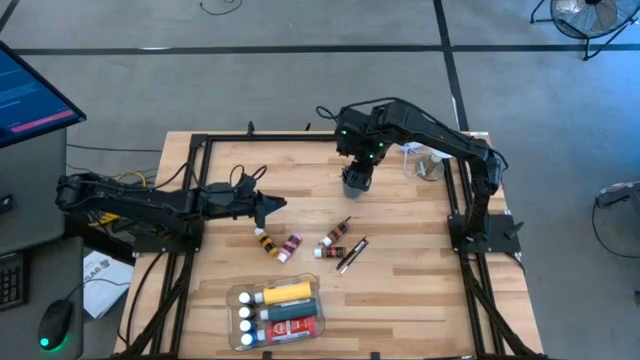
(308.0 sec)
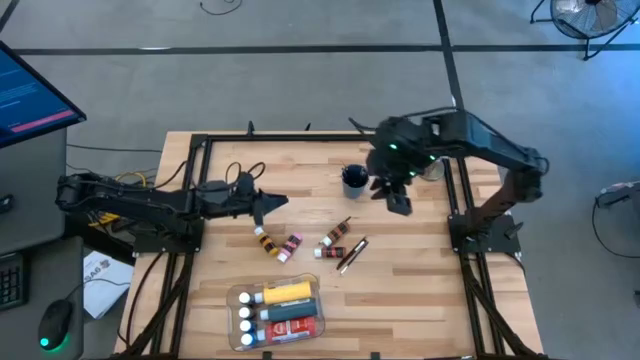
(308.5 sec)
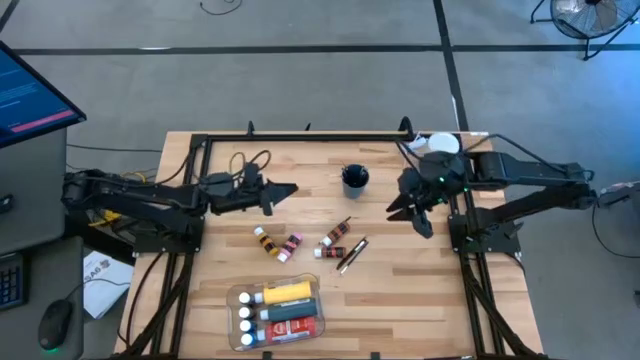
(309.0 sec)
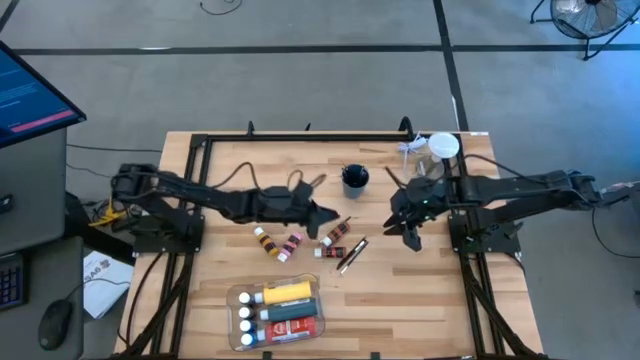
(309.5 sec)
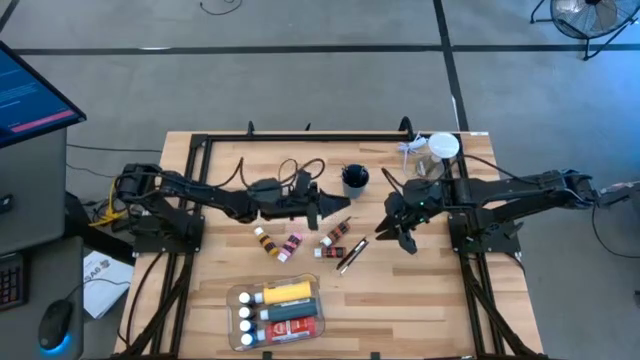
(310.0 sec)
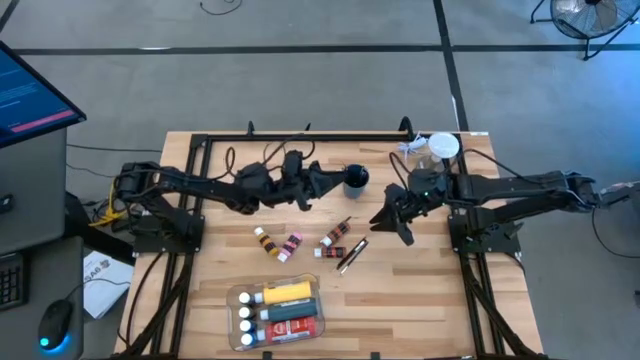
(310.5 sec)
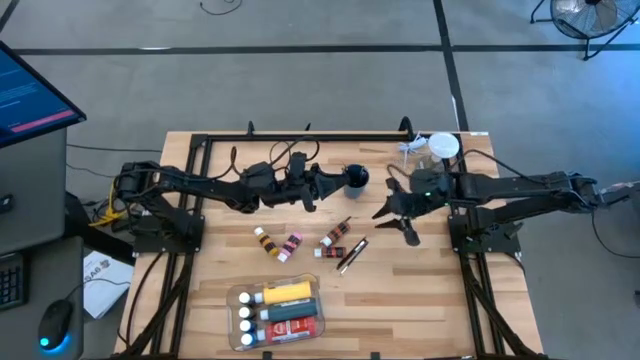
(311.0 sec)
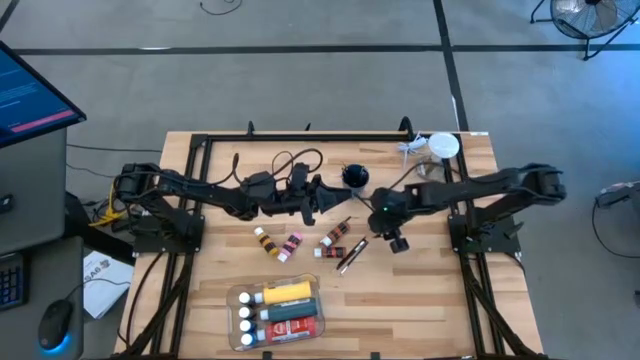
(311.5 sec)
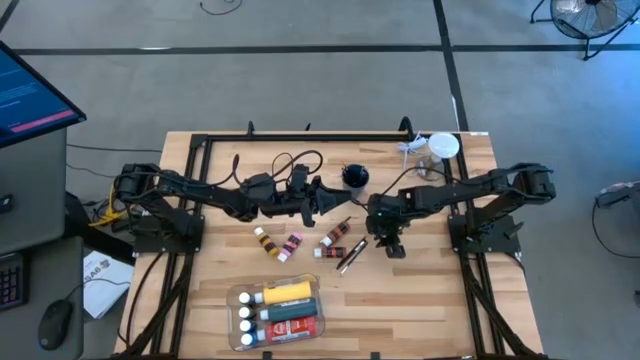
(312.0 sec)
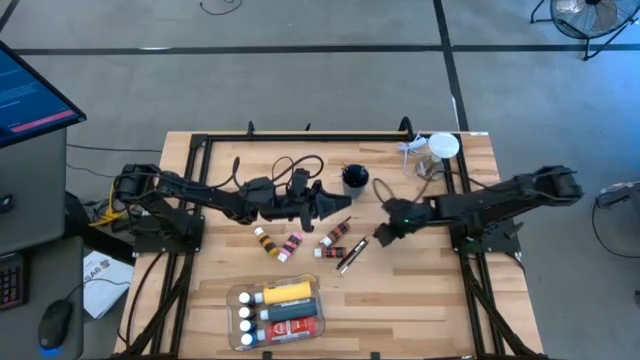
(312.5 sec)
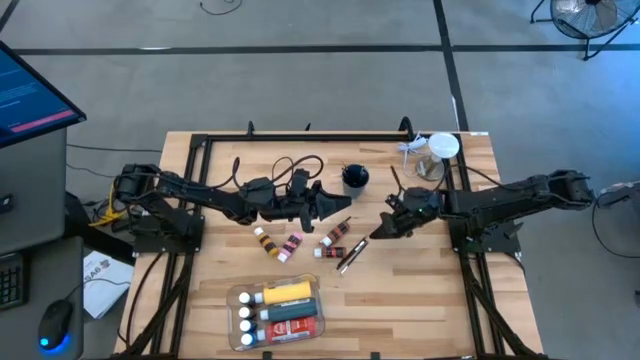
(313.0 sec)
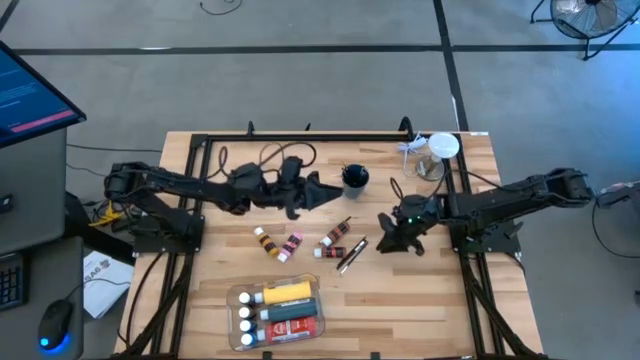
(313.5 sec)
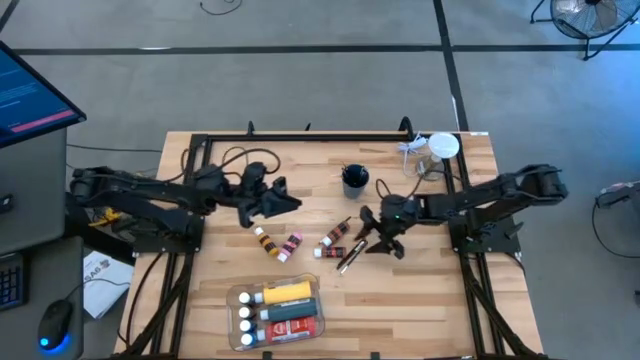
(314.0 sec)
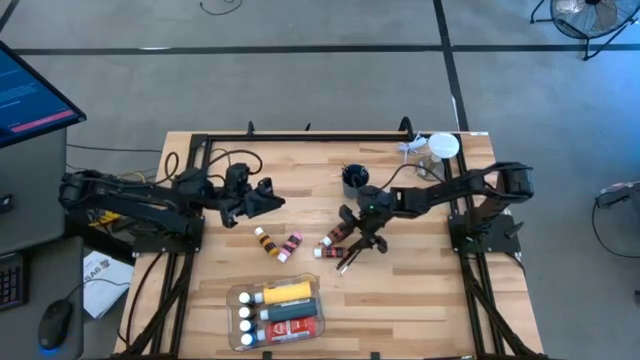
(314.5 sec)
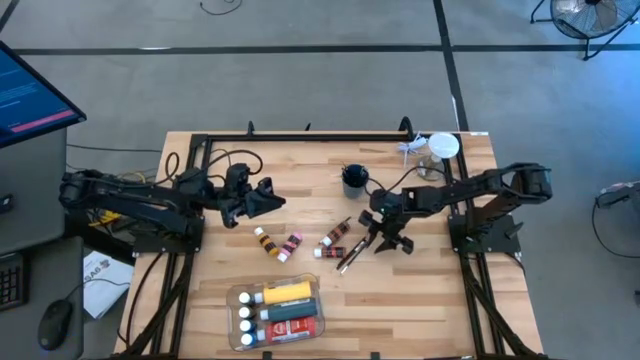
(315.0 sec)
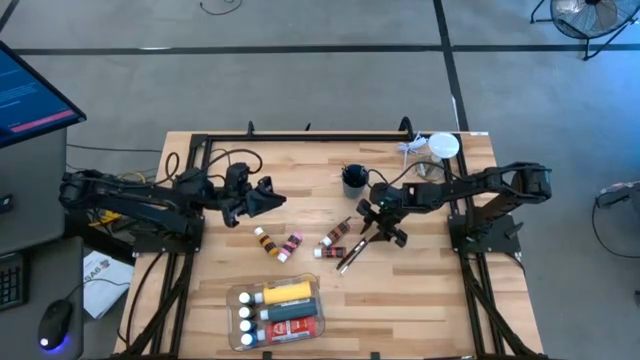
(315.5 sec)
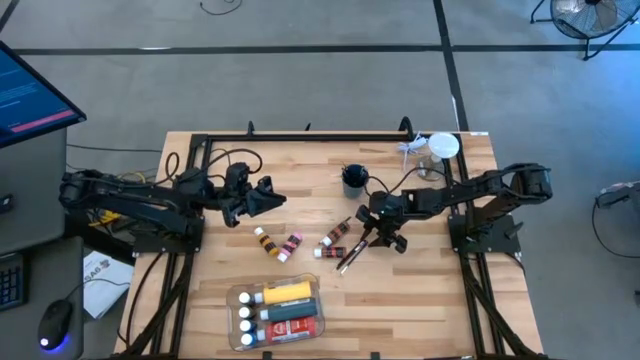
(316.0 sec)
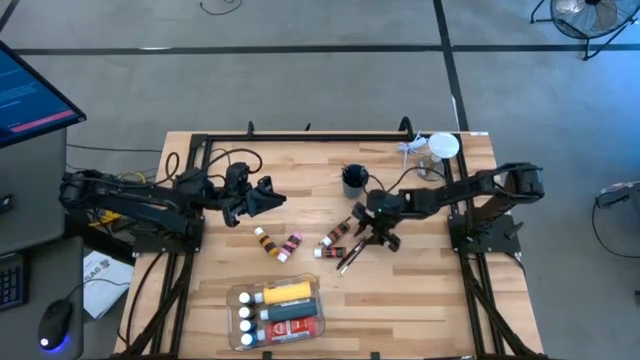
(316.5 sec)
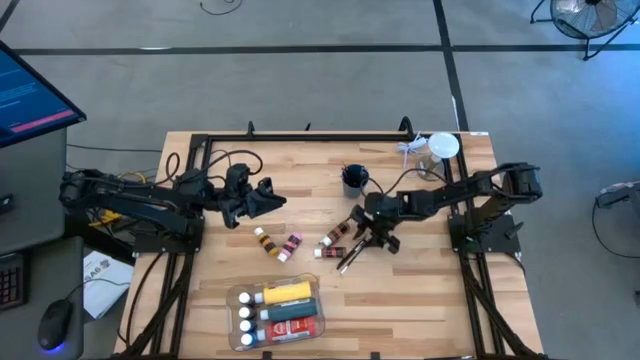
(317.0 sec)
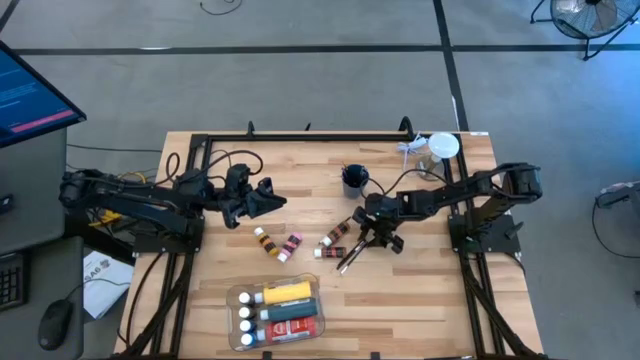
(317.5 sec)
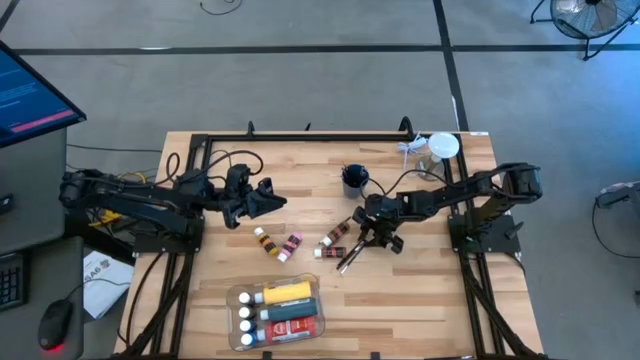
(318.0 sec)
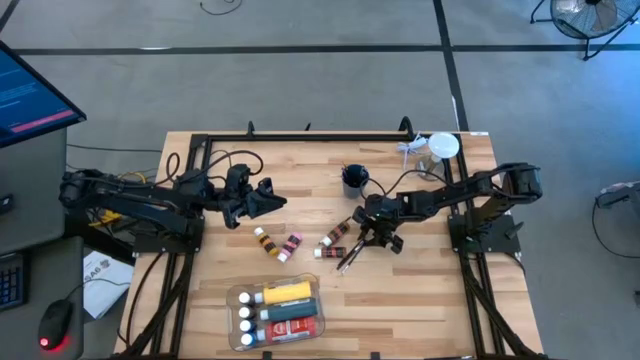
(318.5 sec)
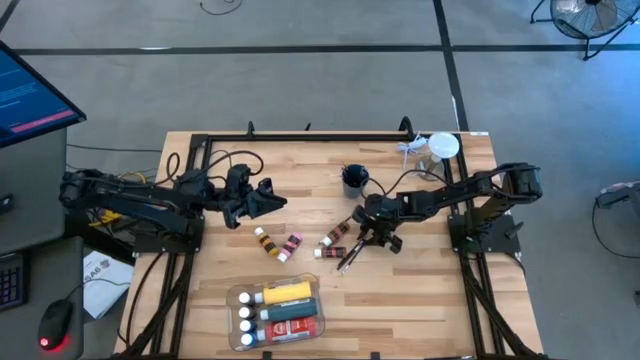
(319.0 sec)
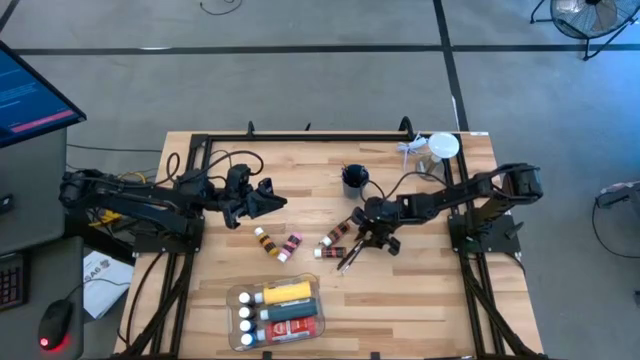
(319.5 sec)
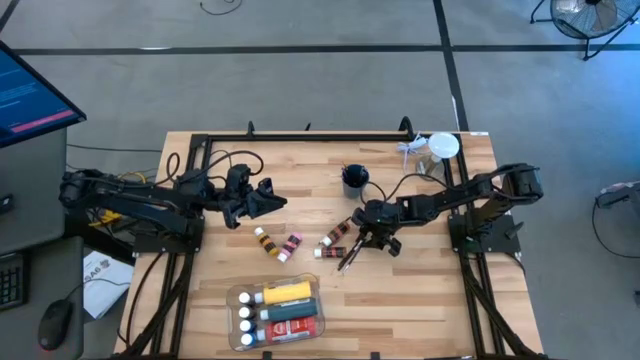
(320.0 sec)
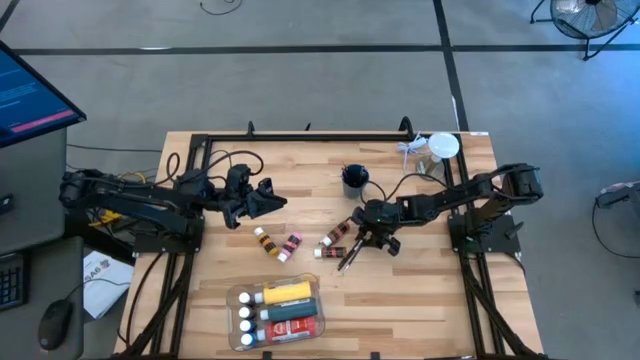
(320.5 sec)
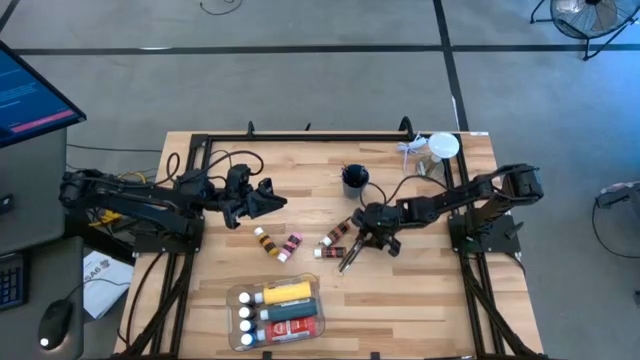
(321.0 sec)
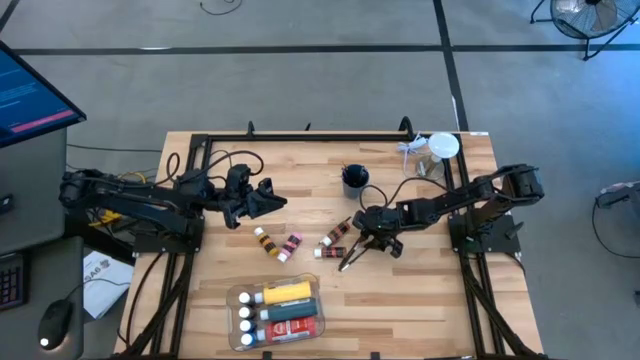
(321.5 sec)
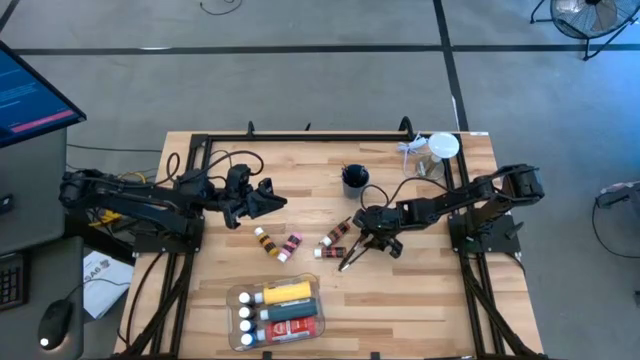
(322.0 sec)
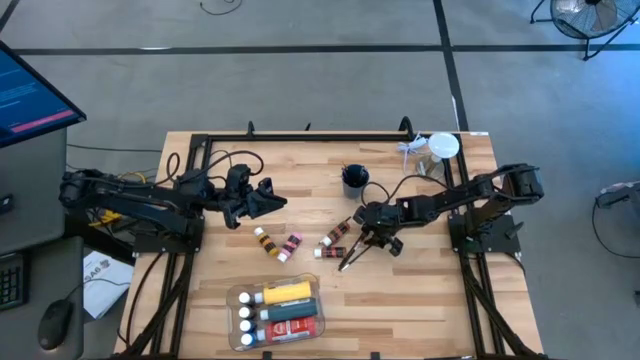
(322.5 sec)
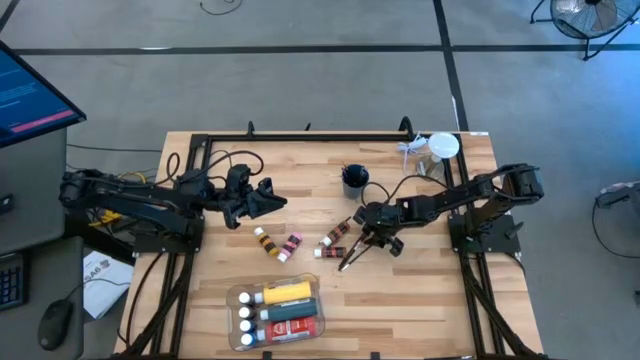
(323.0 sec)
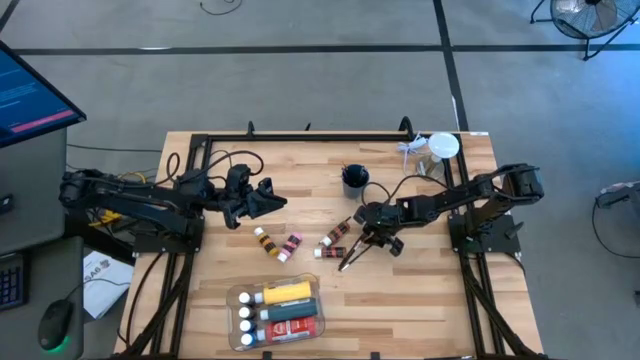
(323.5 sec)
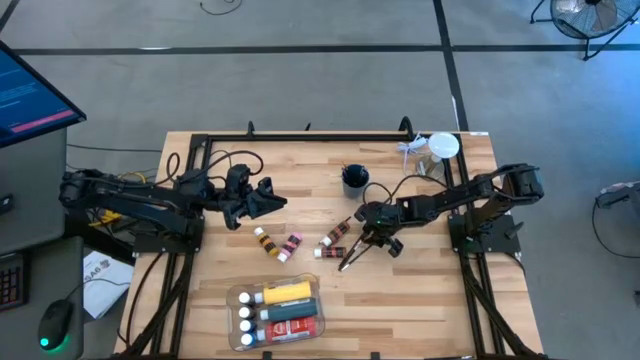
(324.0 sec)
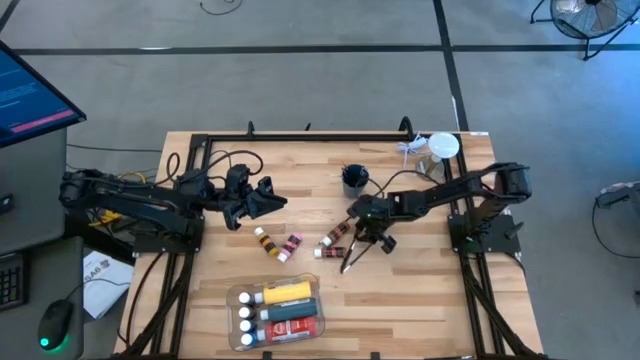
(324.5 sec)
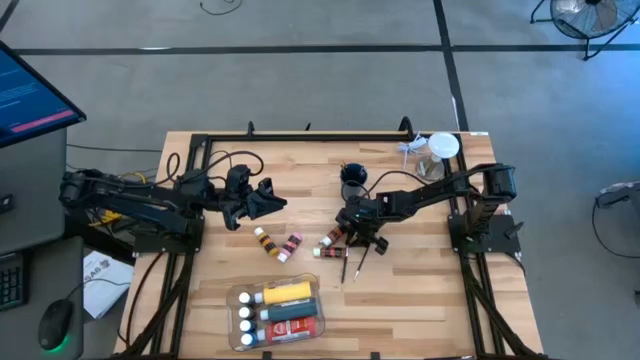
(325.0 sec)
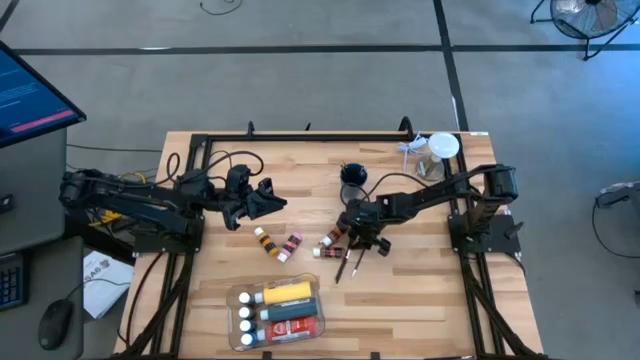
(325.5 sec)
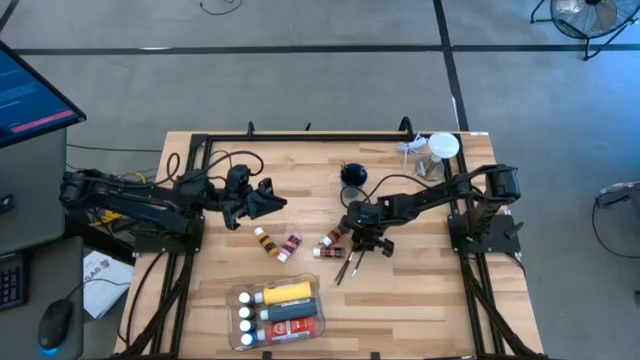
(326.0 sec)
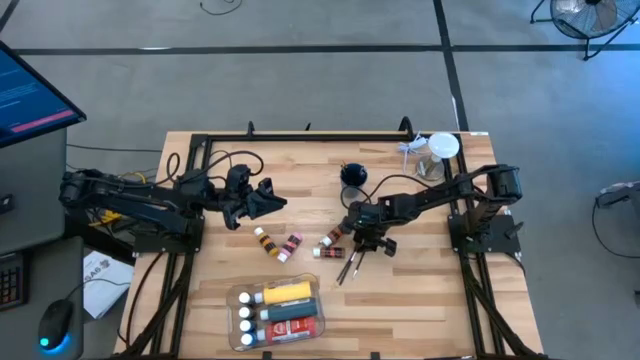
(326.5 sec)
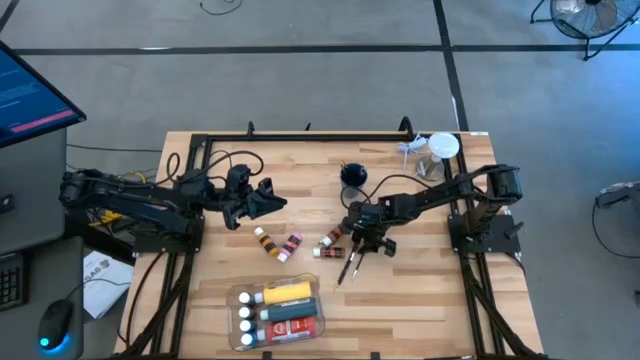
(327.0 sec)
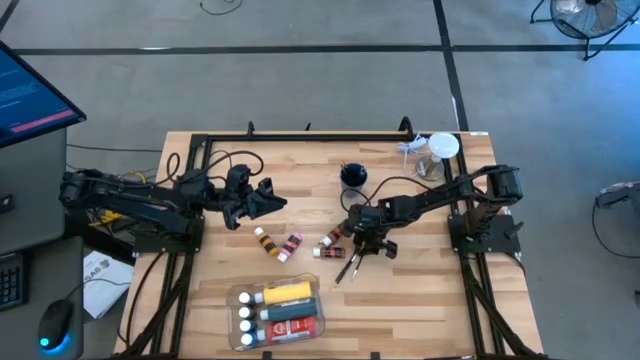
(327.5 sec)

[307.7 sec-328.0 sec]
Task: Pick & Place Paint Supplies
Put the paint brush into the blue cup

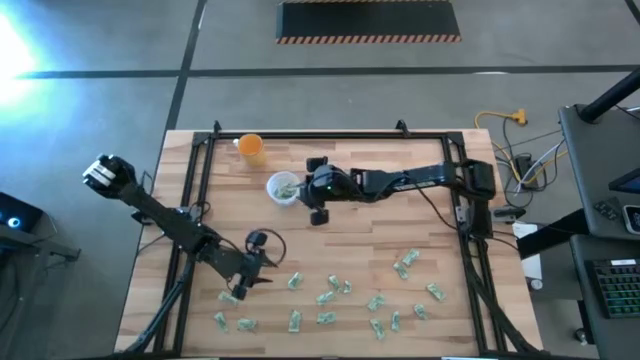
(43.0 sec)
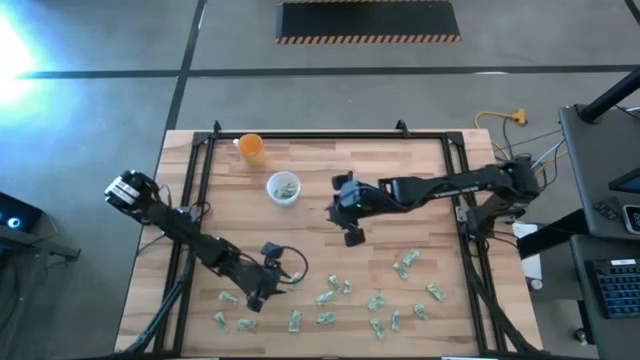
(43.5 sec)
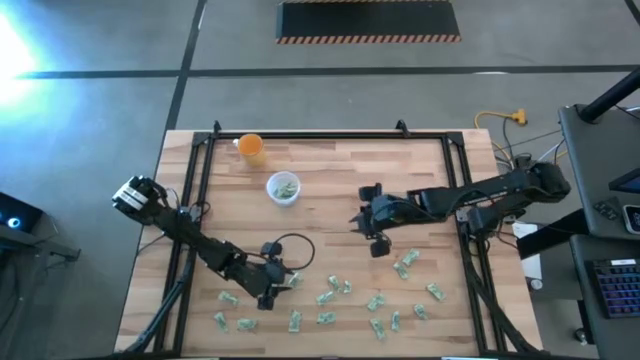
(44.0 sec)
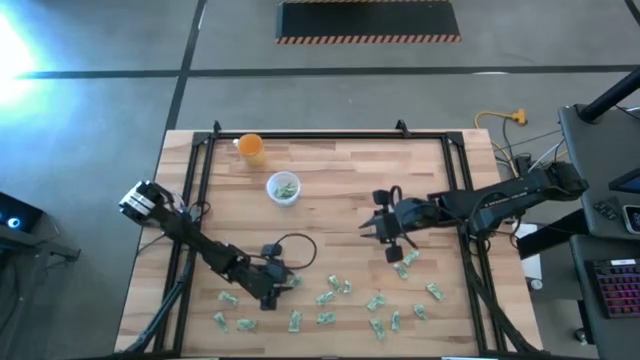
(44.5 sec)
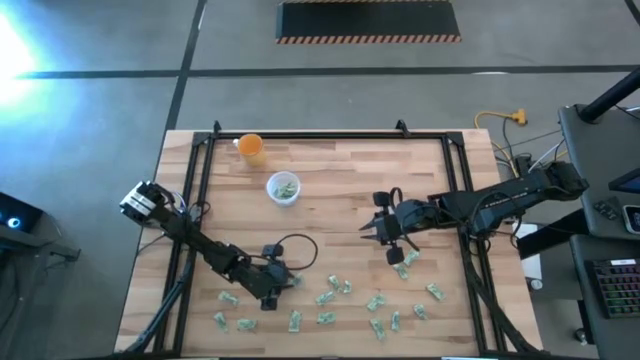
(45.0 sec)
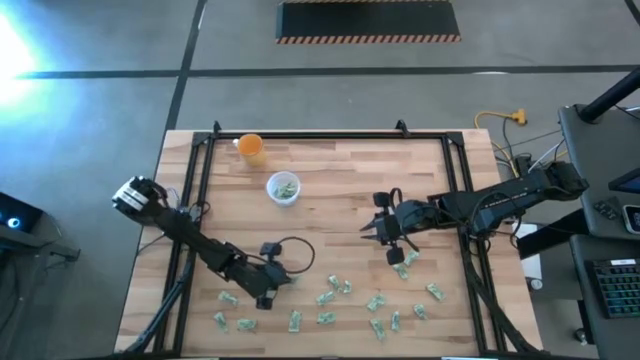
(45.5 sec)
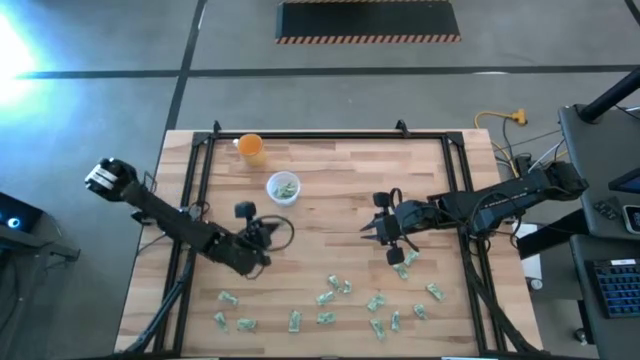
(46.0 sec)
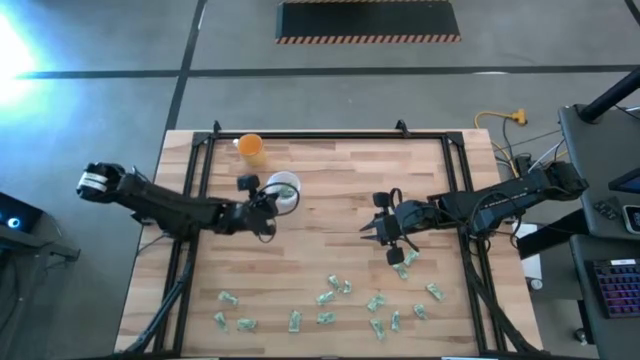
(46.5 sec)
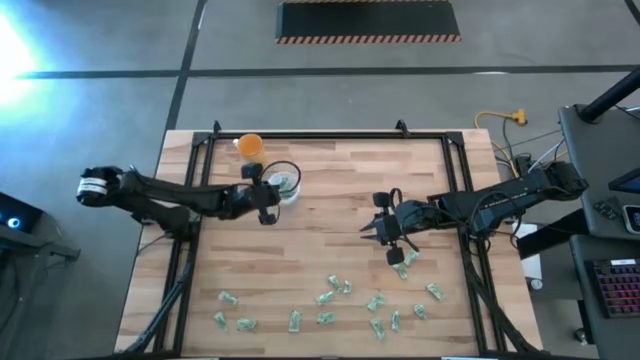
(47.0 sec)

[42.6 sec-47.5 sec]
Task: Pick and place Stevia / Truvia into bins
Put the stevia packet into the transparent container
